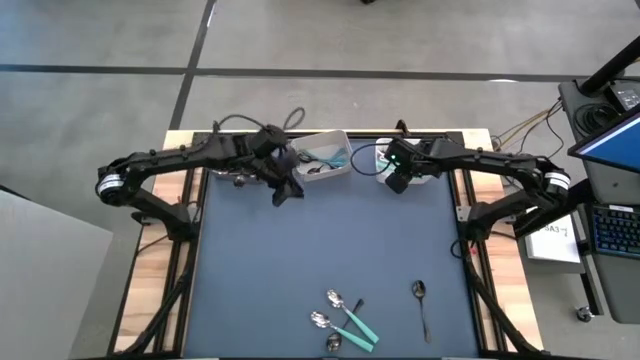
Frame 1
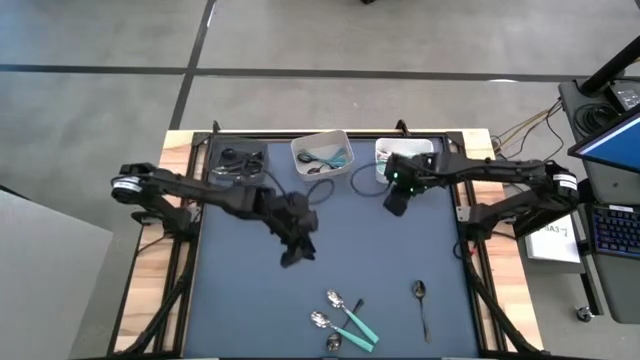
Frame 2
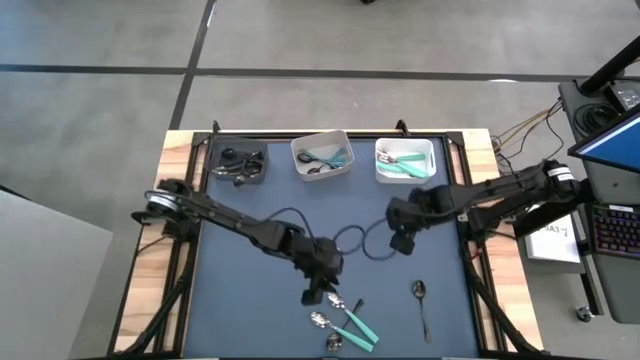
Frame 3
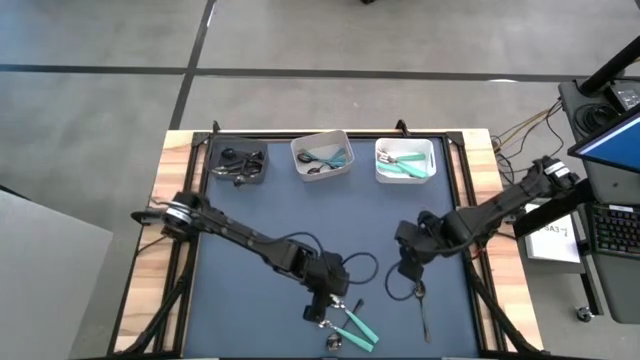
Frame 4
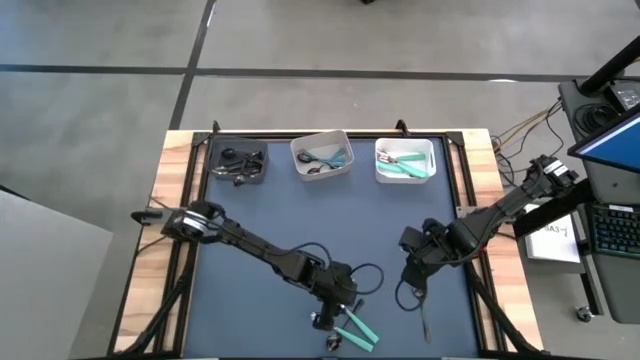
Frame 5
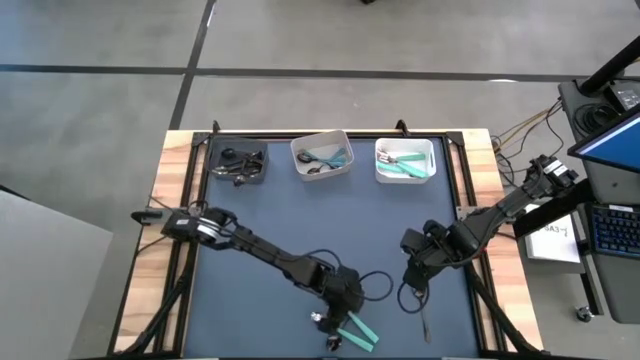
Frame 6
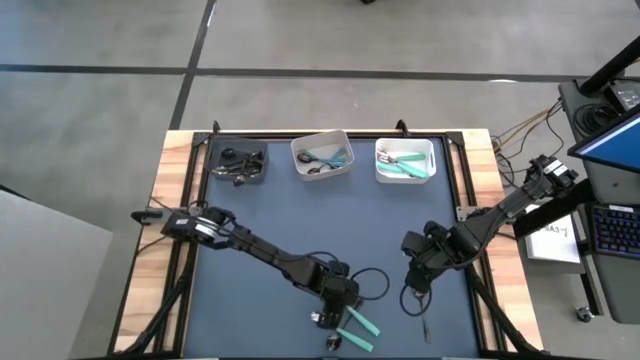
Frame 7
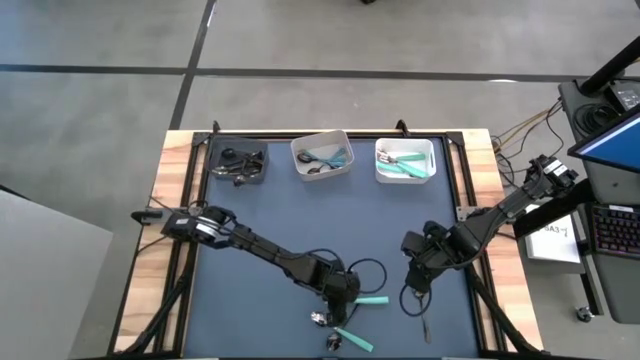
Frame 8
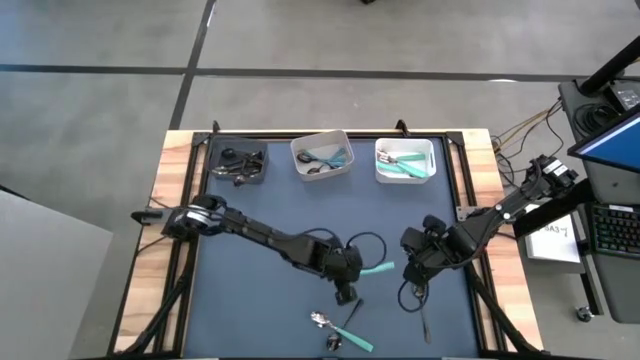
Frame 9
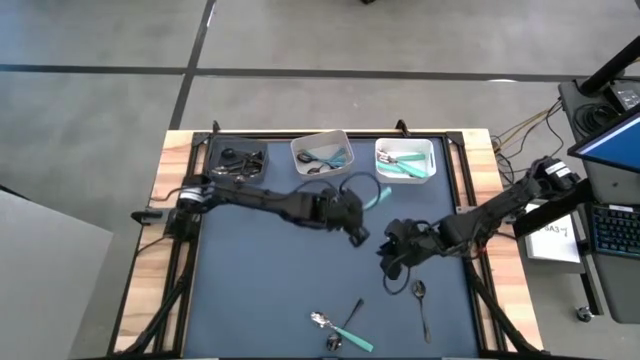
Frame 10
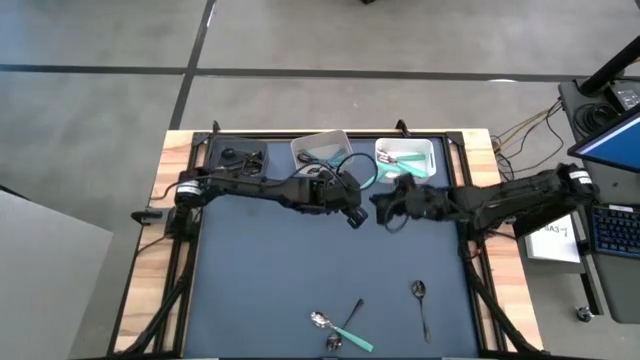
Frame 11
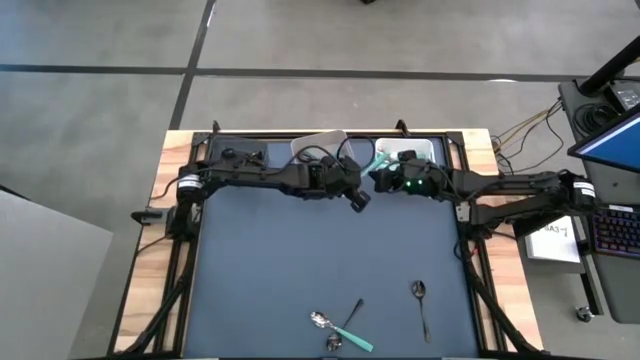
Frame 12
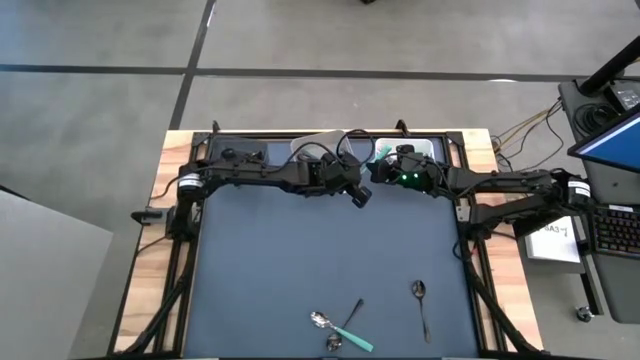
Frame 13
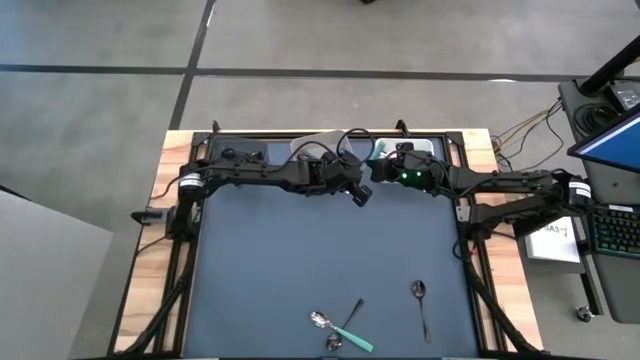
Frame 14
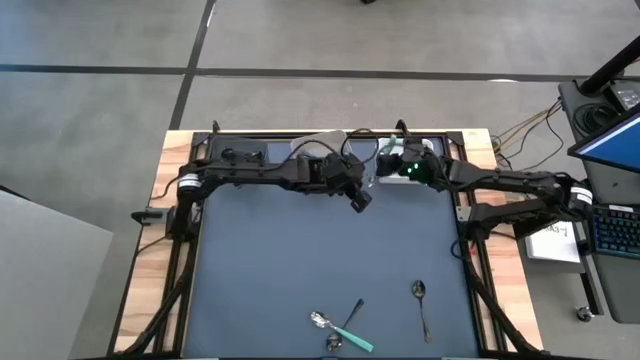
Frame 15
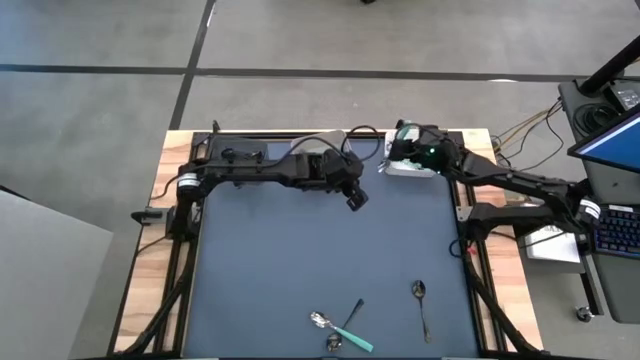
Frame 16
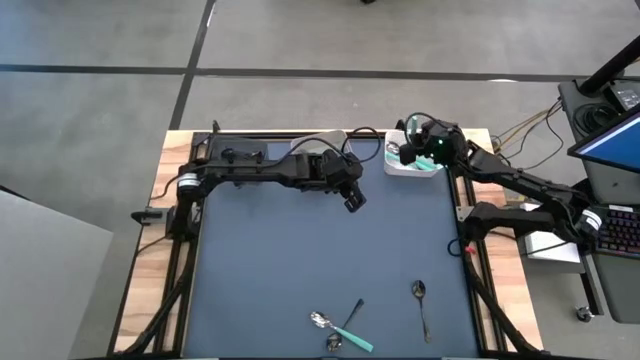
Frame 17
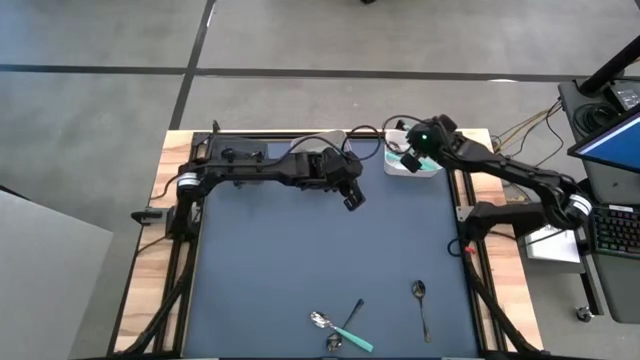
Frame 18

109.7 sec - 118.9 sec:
Task: Sort silverware by color (type)
Put the light blue spoon into the white bin

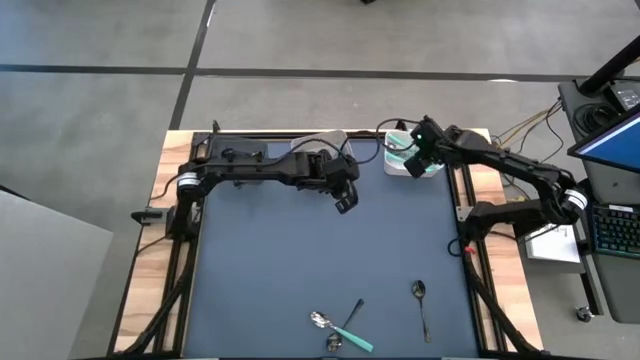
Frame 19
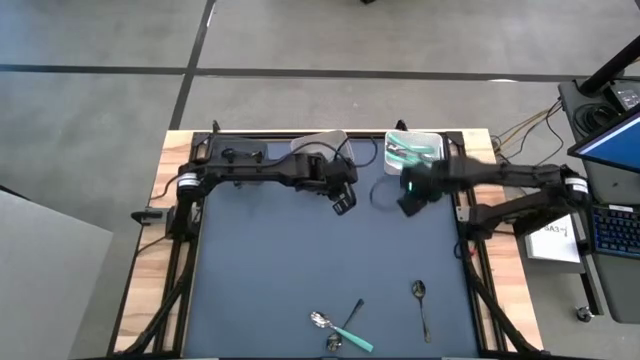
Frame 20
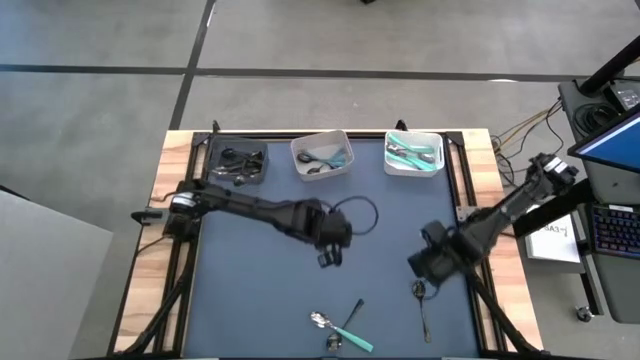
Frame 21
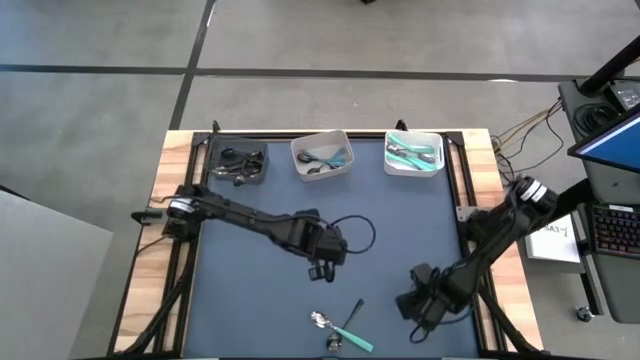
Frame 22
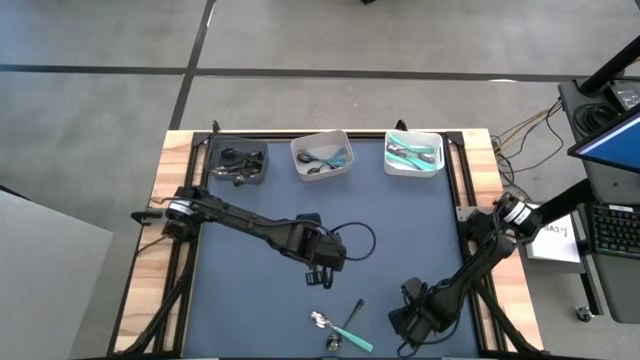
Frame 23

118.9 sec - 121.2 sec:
Put the black spoon into the black bin

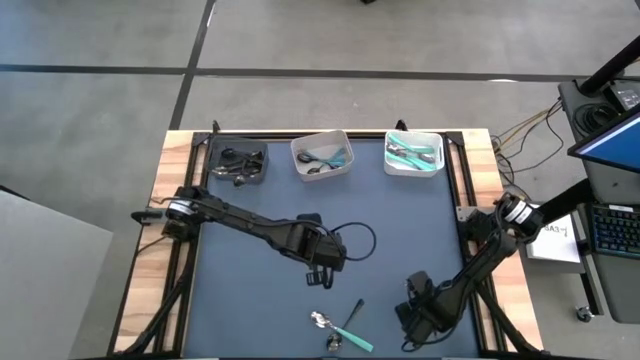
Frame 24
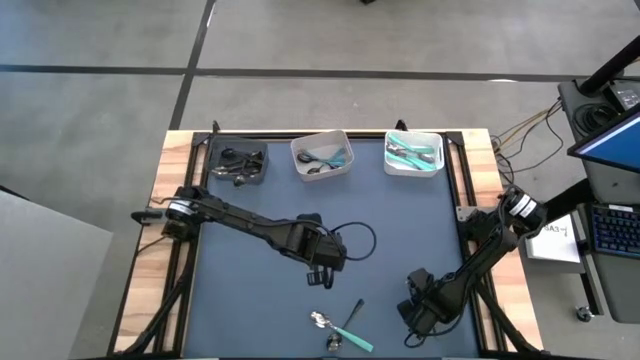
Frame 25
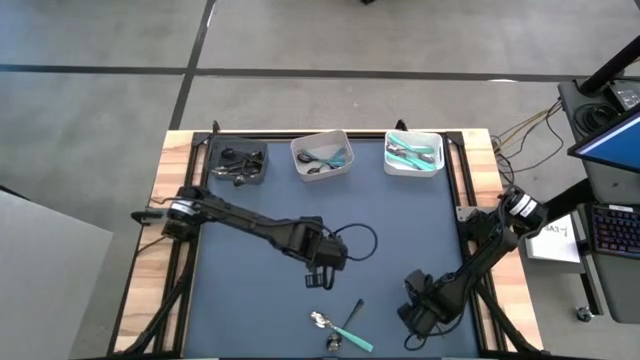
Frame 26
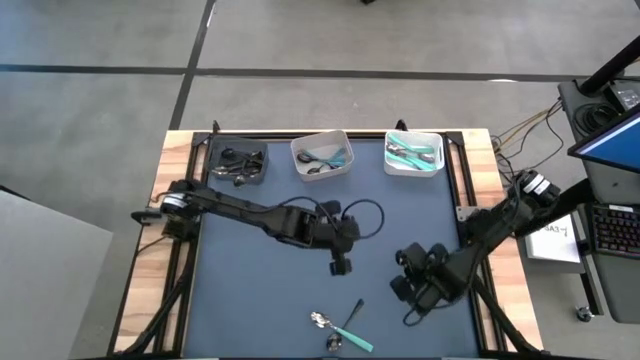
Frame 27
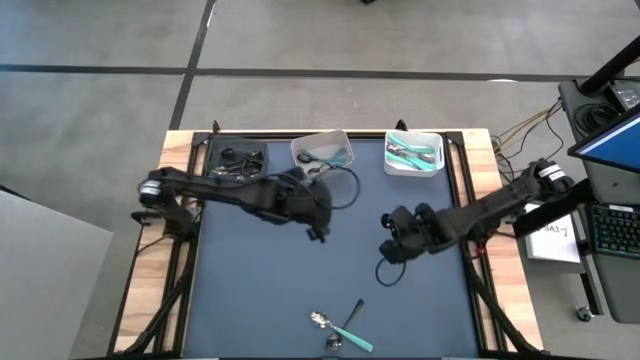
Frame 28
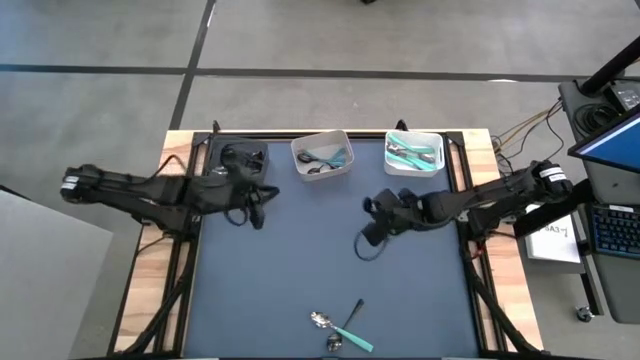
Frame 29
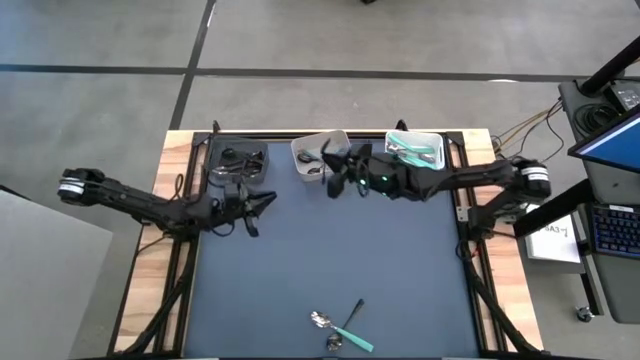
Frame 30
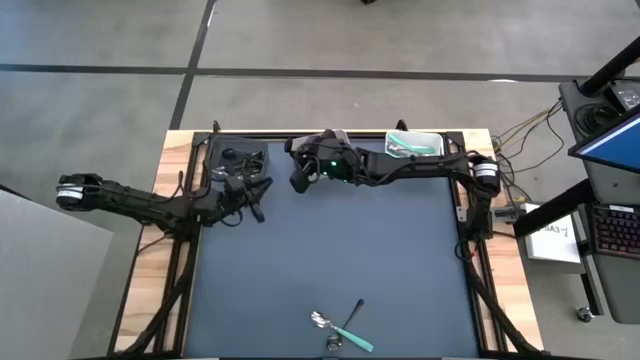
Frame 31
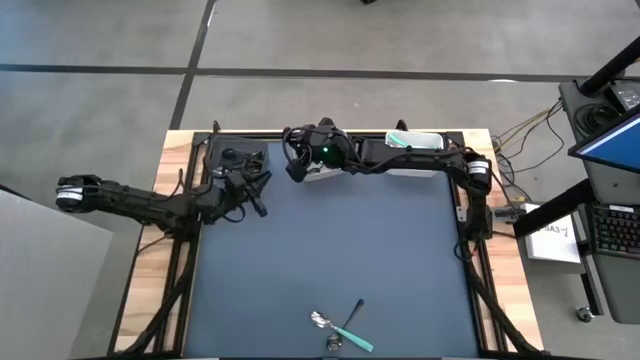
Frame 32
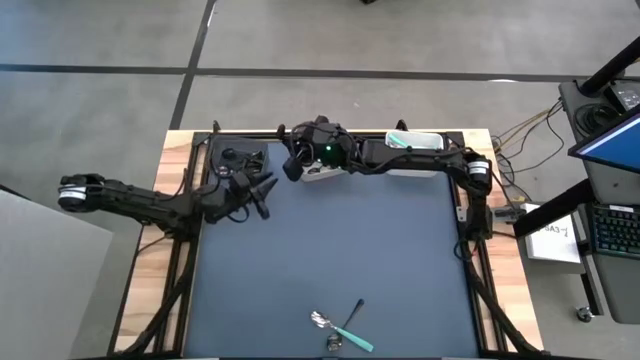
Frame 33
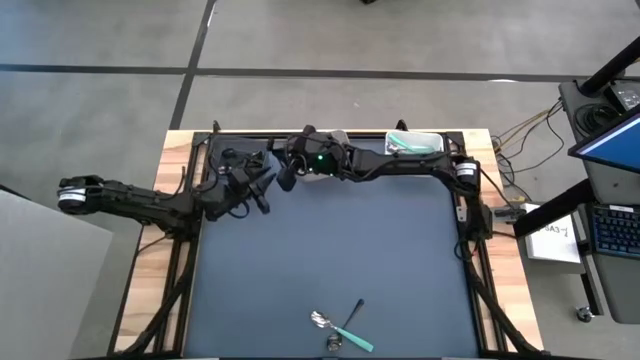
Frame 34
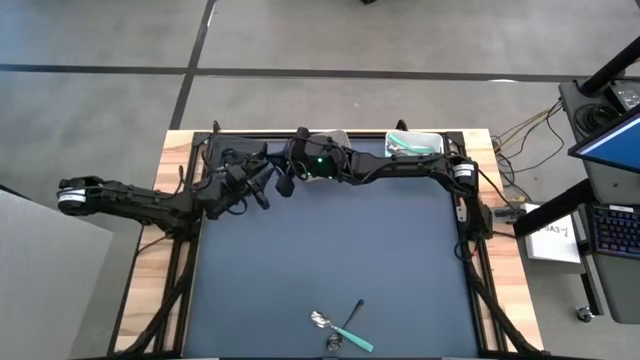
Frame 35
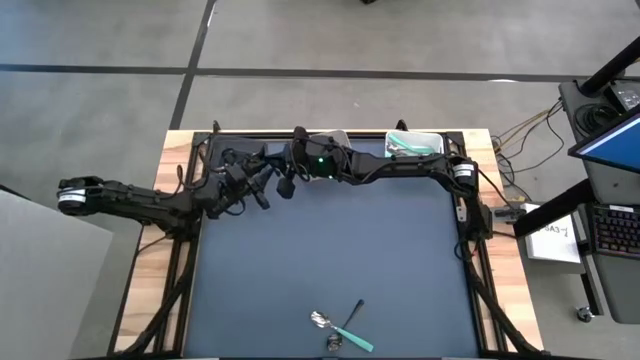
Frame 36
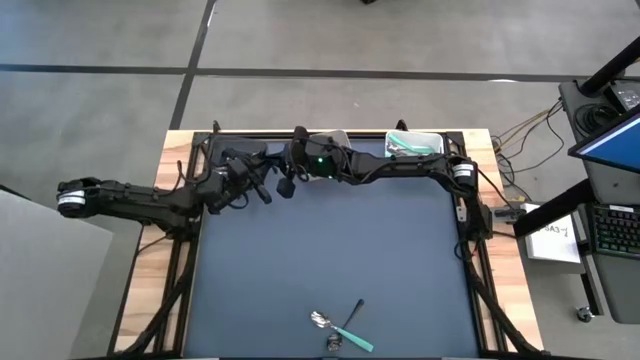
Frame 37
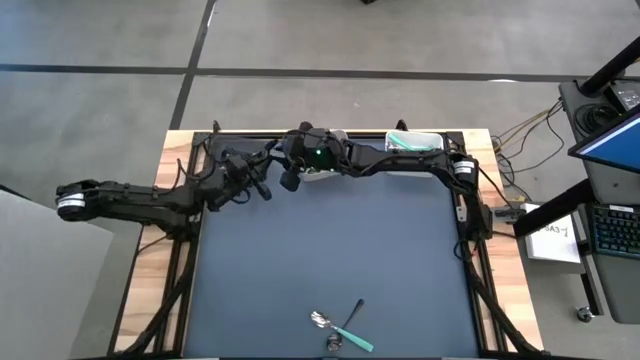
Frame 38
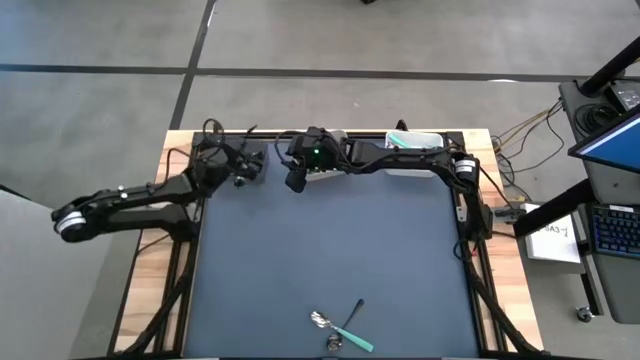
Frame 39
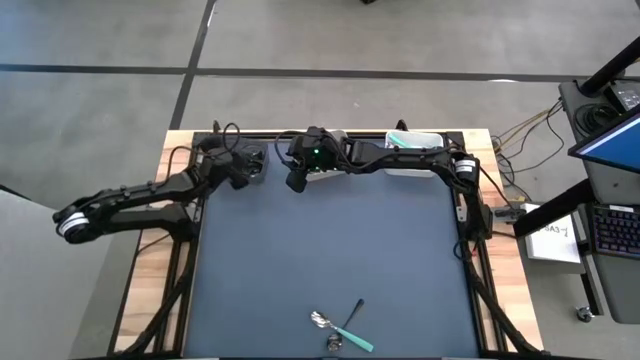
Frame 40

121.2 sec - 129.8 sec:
Put the black spoon into the black bin

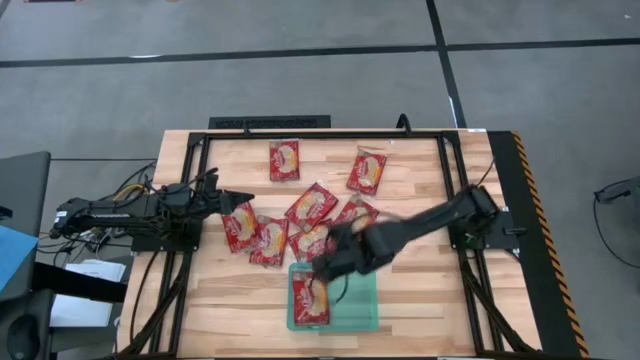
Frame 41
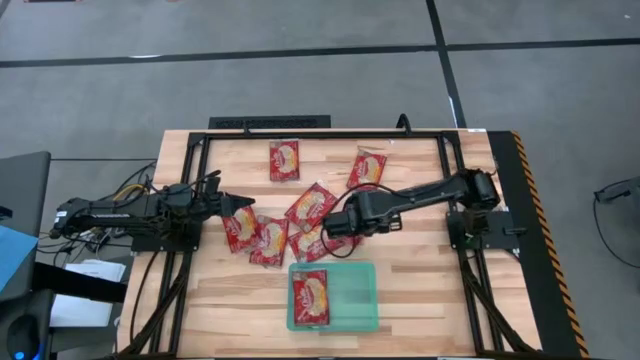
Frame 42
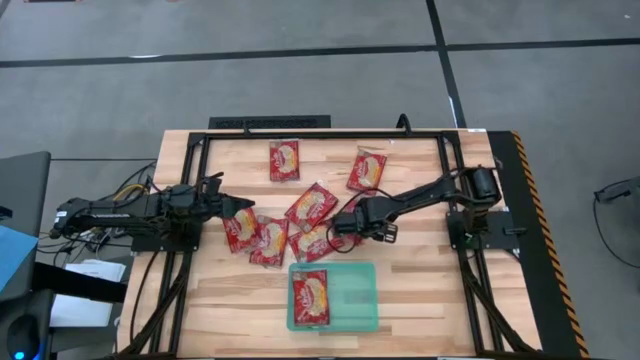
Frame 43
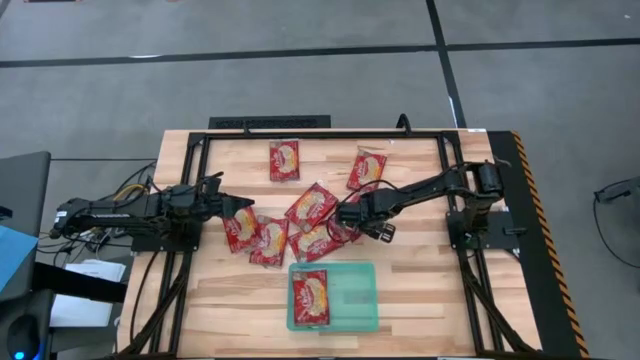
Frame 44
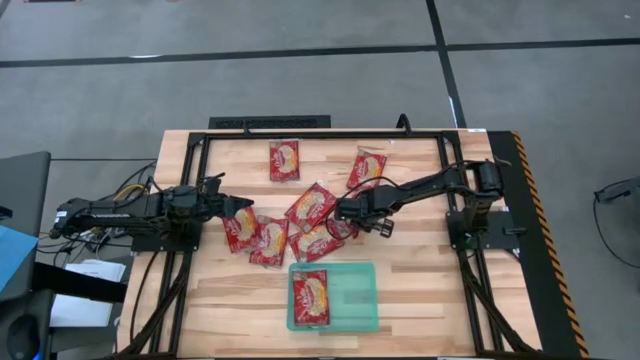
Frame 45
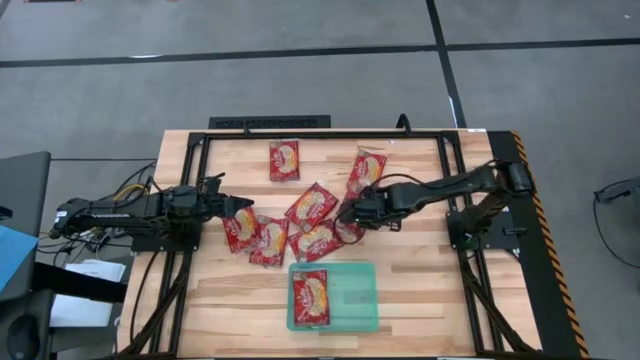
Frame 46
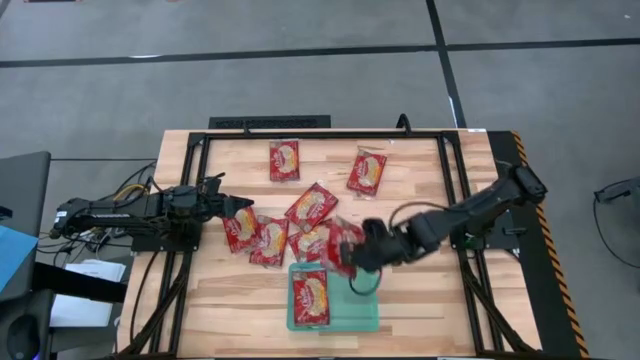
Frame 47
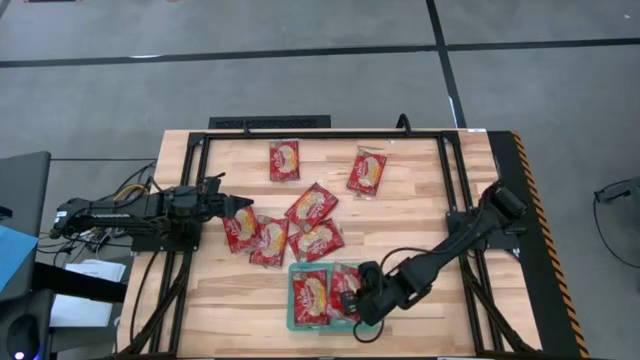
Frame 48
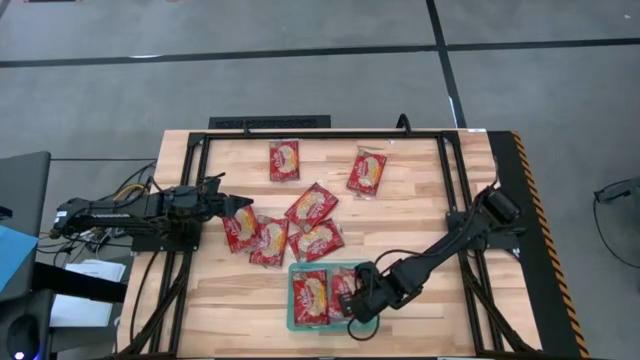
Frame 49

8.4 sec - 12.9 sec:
Task: Sort popcorn bags into baskets
Put the red popcorn bag into the green bin
